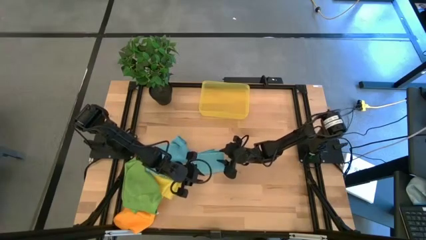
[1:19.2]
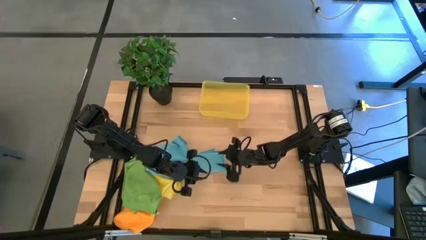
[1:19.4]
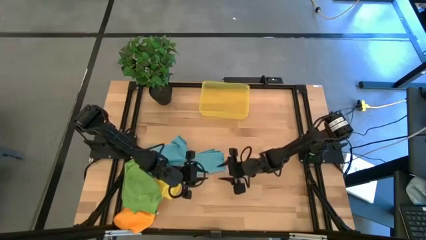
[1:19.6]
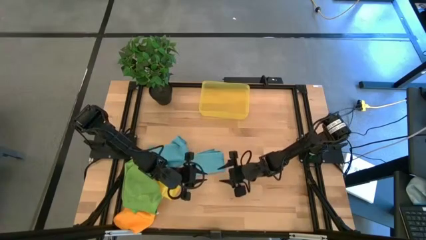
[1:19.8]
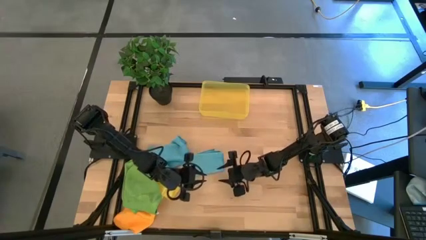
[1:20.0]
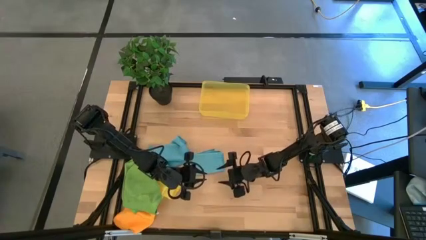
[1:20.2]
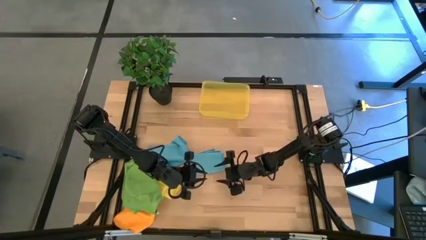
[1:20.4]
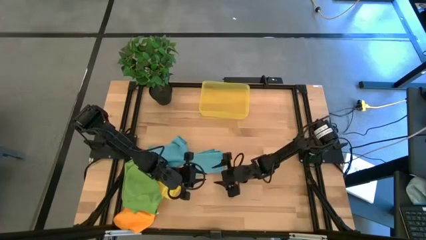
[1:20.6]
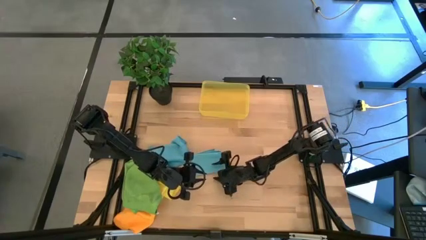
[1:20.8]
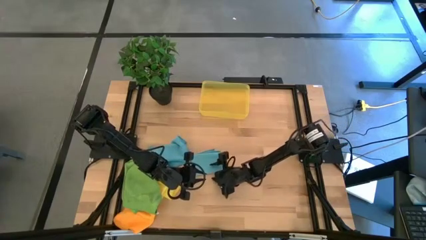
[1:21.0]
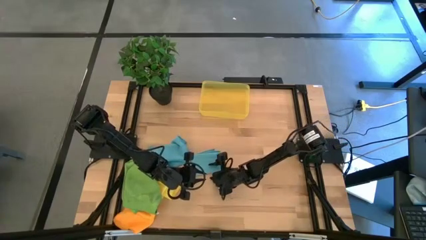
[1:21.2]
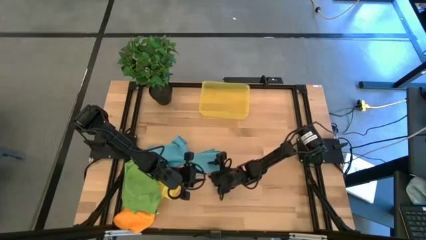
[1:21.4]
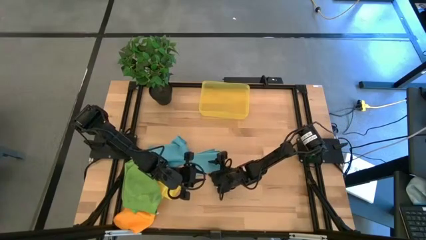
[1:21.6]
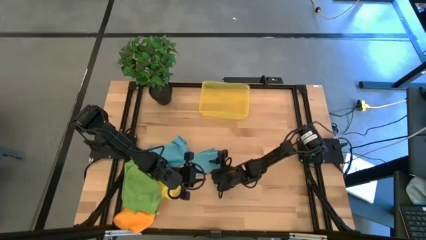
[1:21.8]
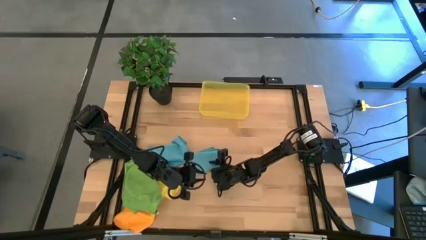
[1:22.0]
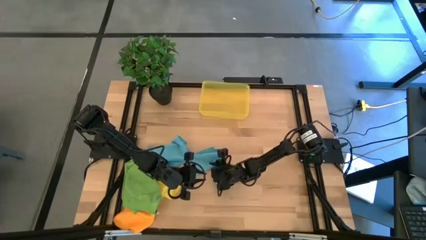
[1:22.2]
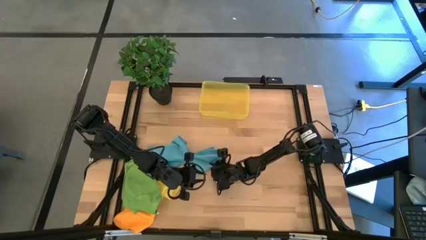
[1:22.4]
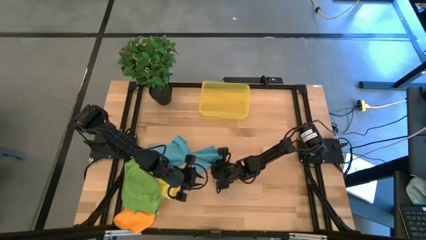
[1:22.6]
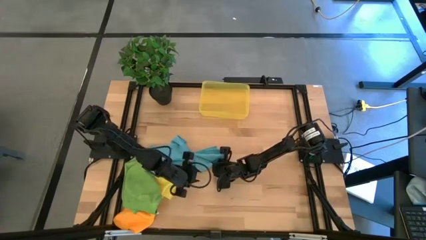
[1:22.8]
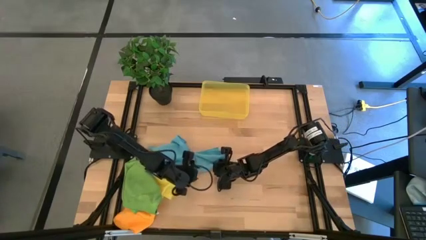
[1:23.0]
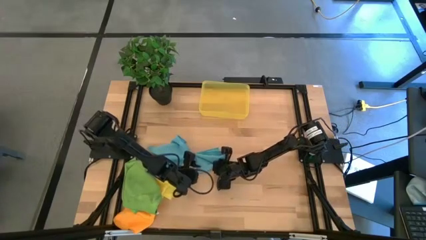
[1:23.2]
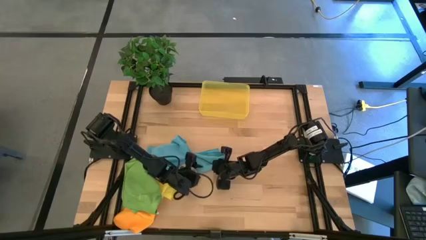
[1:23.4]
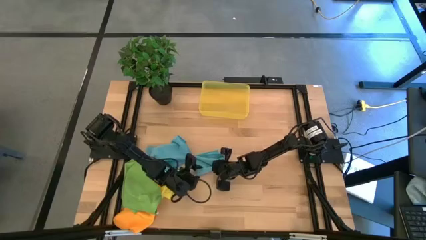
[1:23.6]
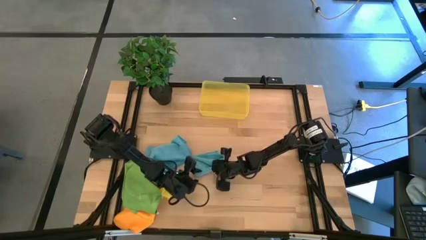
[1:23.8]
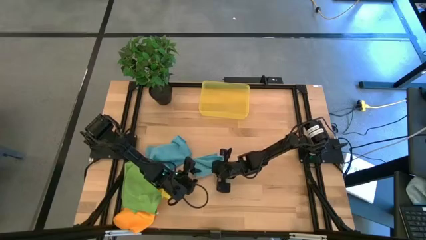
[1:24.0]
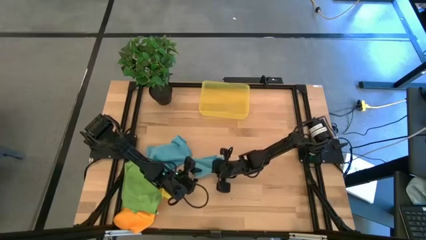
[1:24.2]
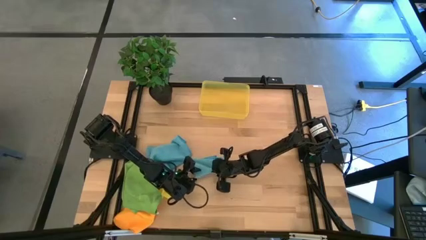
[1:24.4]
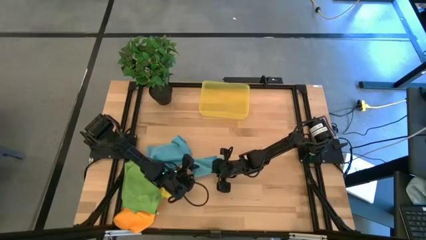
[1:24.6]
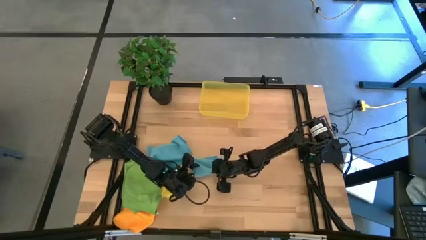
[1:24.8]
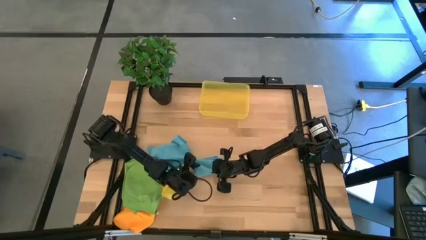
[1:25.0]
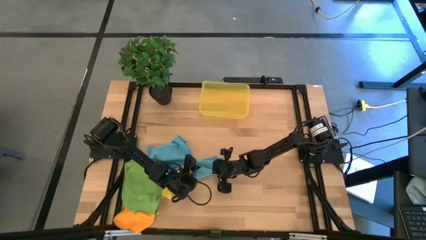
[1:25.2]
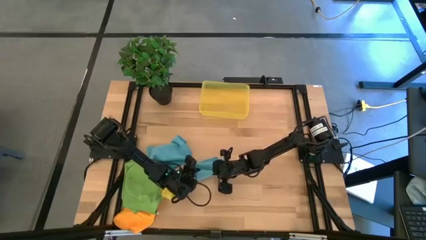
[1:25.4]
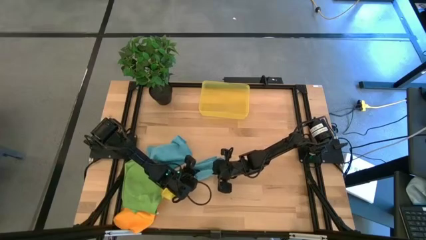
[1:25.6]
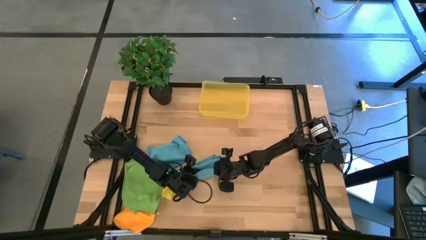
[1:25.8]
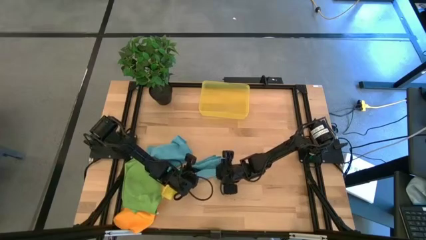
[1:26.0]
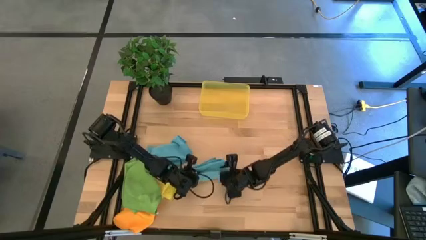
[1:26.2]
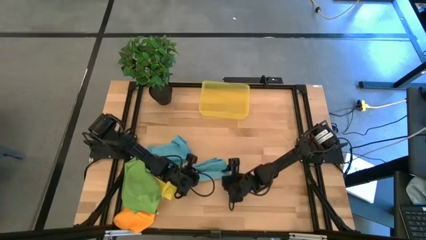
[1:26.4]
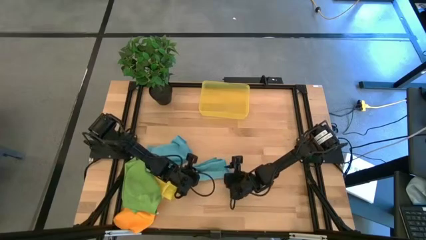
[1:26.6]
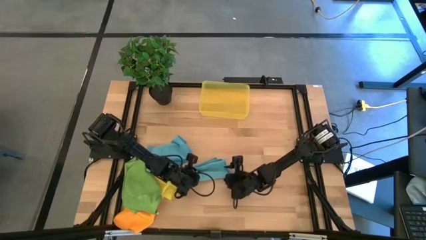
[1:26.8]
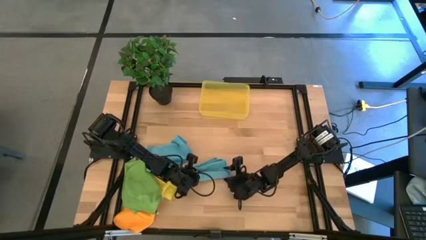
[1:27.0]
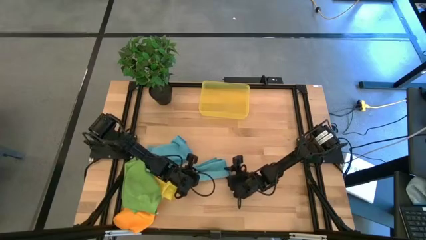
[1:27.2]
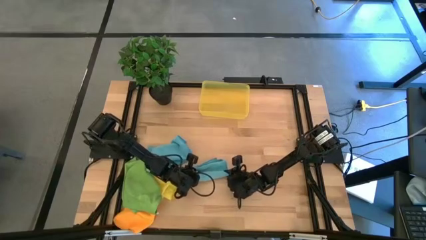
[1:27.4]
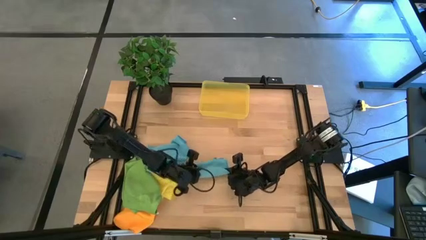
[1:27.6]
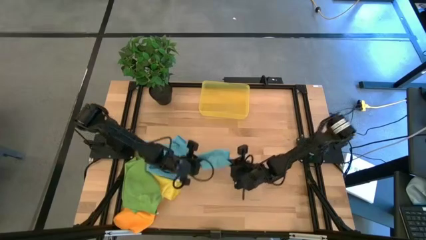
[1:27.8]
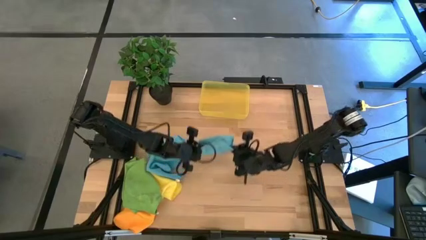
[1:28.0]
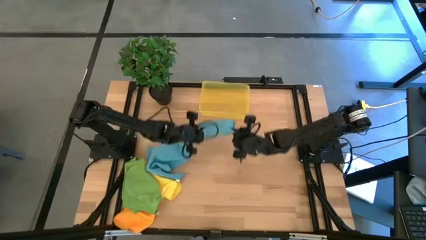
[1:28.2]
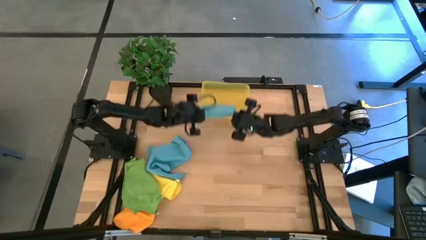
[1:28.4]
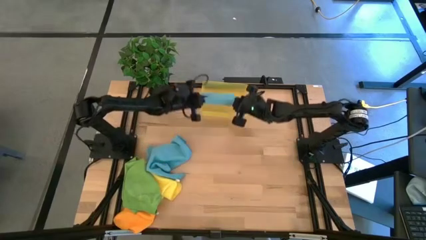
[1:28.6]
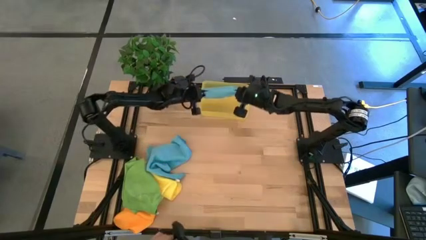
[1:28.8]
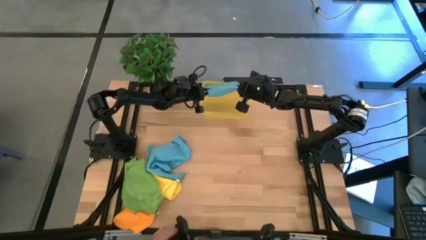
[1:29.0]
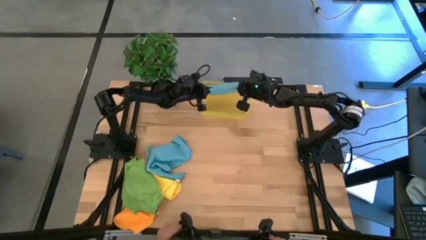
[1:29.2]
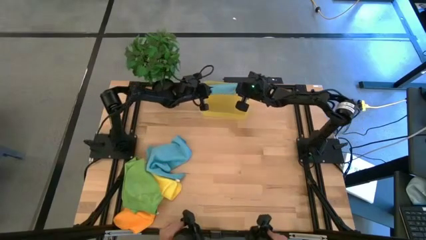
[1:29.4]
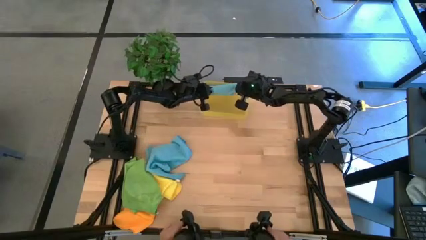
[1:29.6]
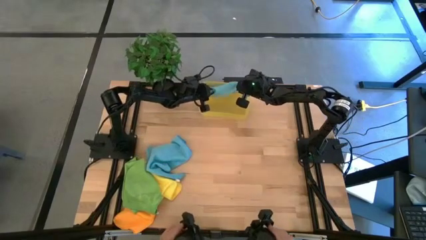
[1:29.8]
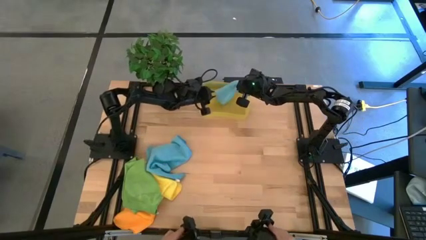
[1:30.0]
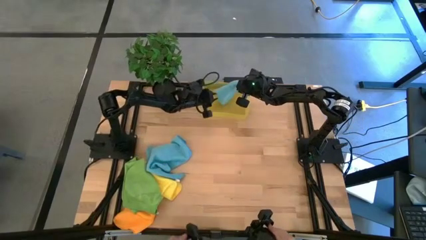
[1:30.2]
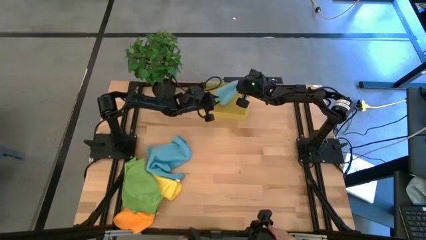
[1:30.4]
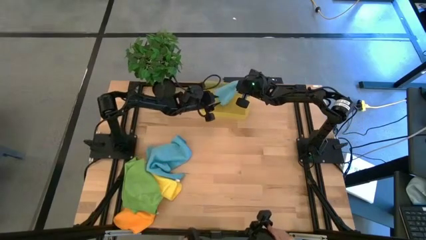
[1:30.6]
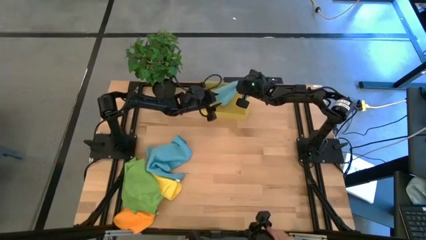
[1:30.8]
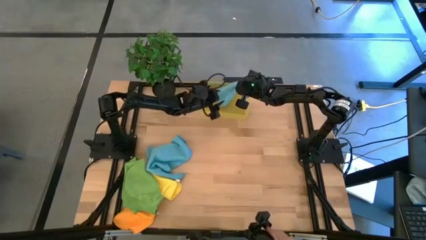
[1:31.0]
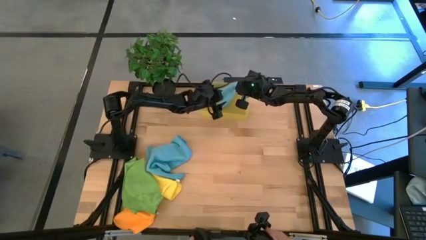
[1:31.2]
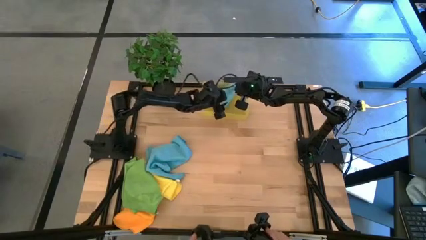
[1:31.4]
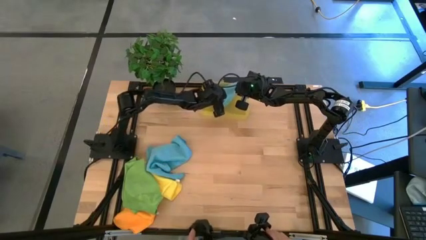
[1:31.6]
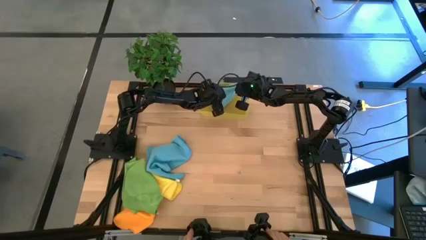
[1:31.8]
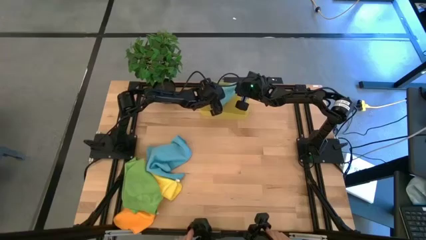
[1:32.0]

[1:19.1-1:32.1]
Task: Fold microfiber towels
Put the folded left blue microfiber towel into the yellow bin
